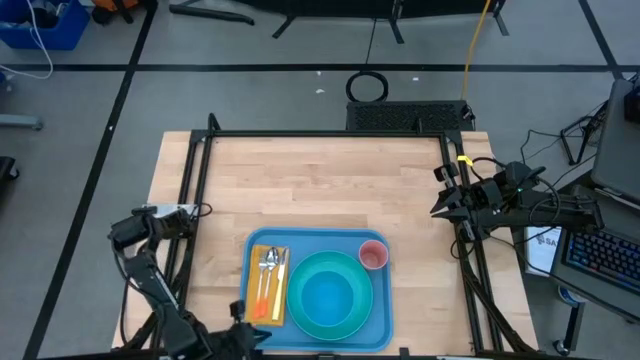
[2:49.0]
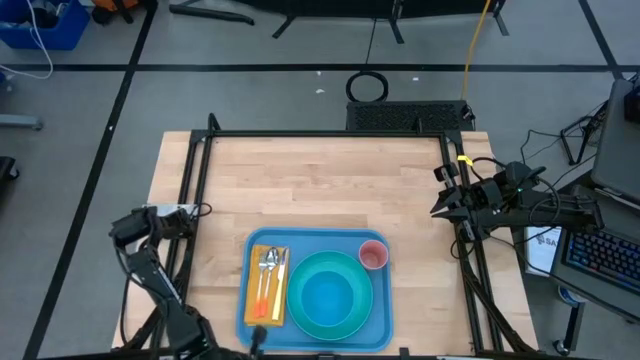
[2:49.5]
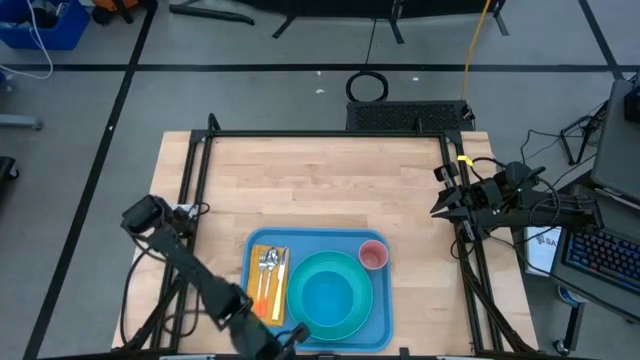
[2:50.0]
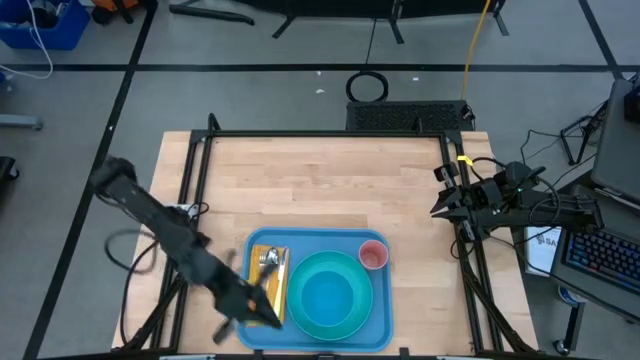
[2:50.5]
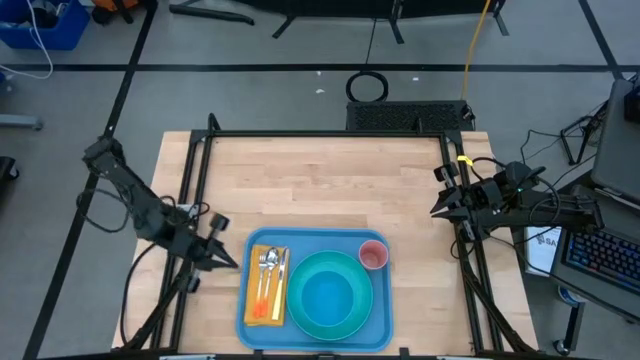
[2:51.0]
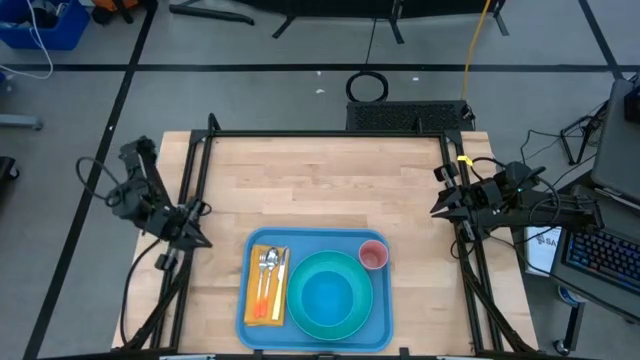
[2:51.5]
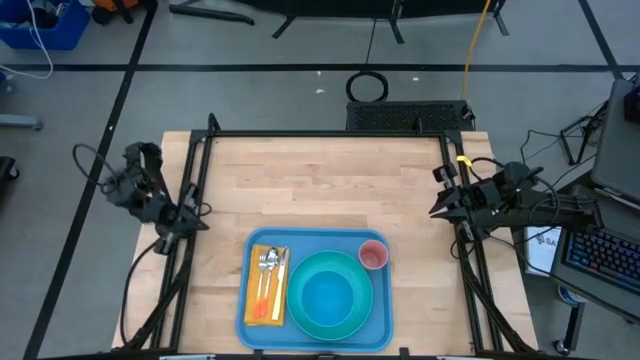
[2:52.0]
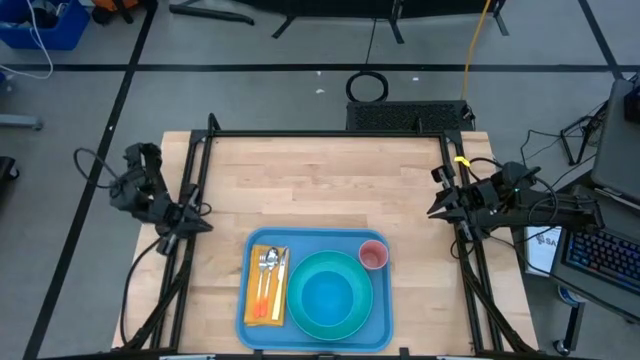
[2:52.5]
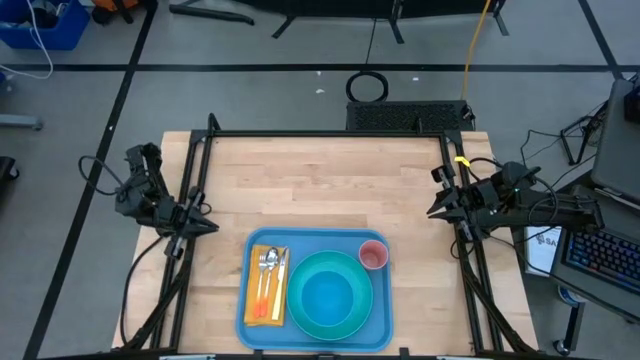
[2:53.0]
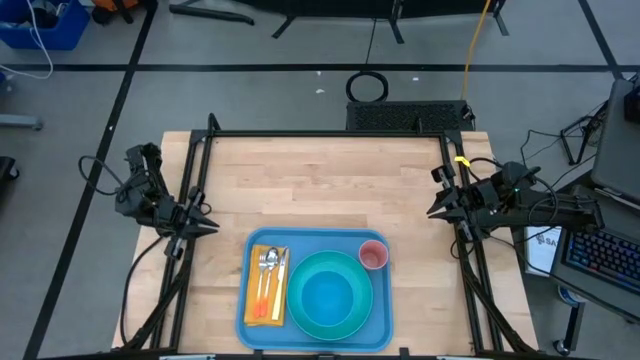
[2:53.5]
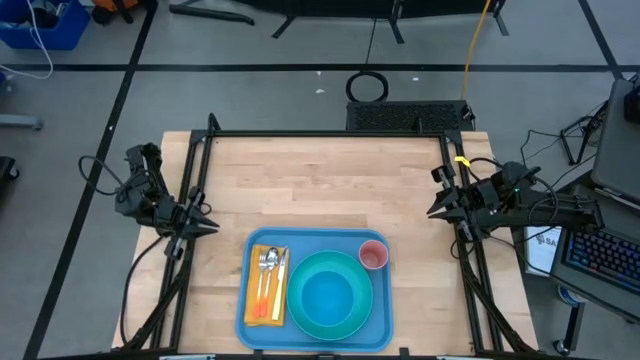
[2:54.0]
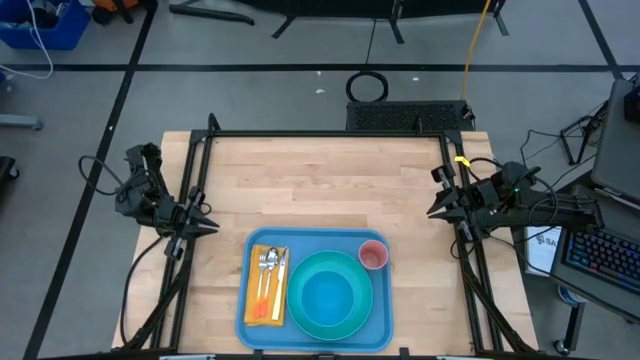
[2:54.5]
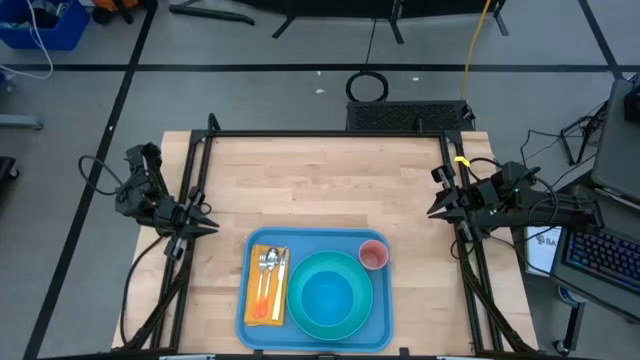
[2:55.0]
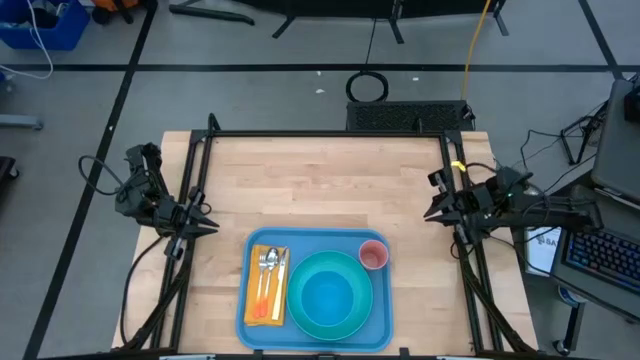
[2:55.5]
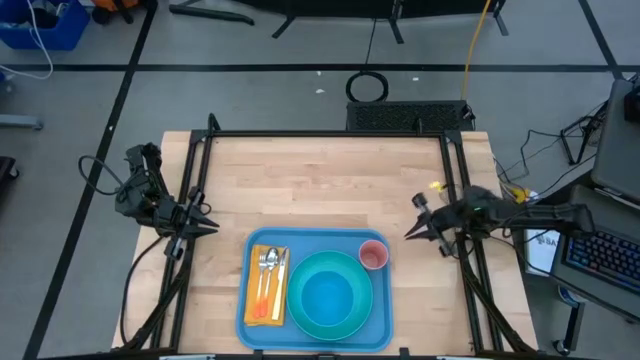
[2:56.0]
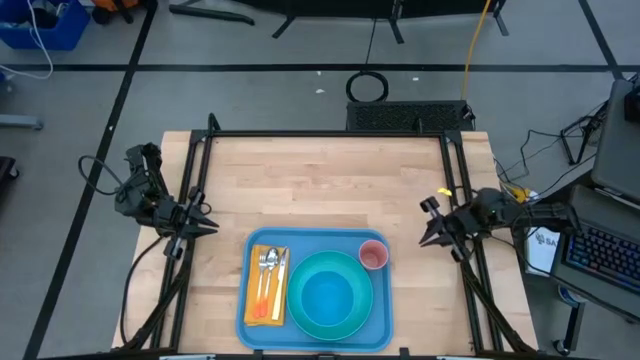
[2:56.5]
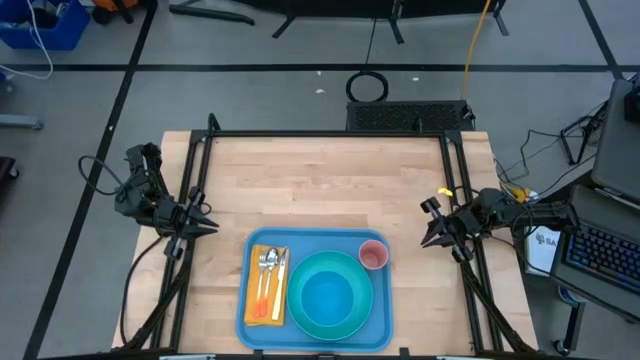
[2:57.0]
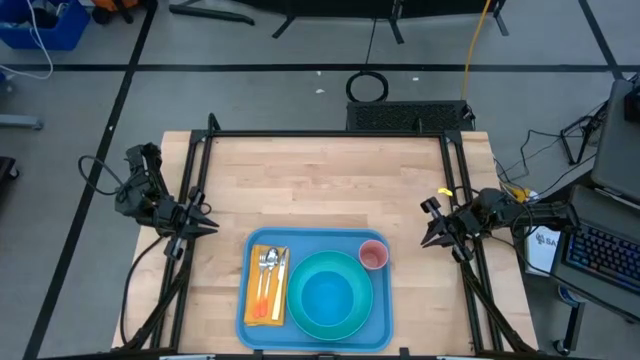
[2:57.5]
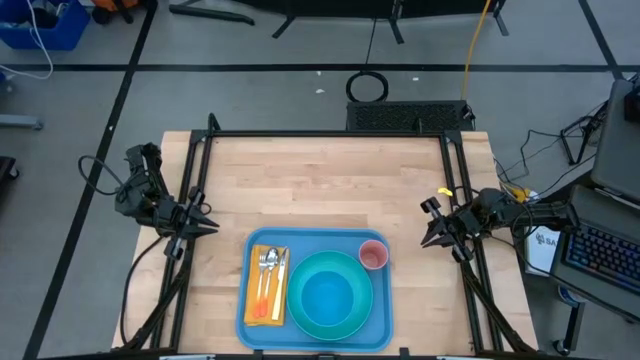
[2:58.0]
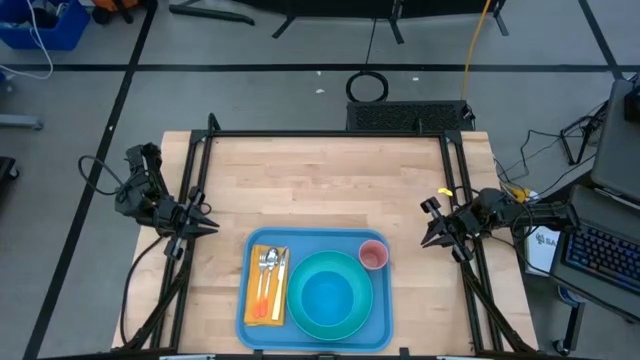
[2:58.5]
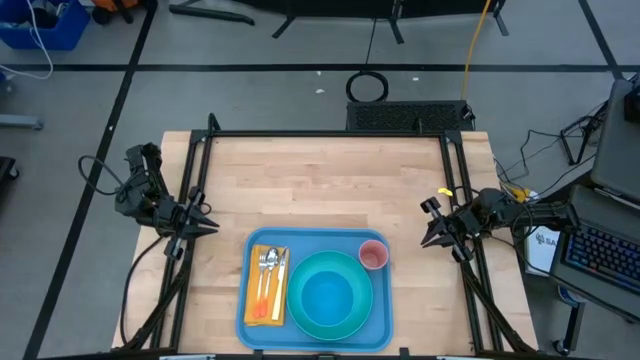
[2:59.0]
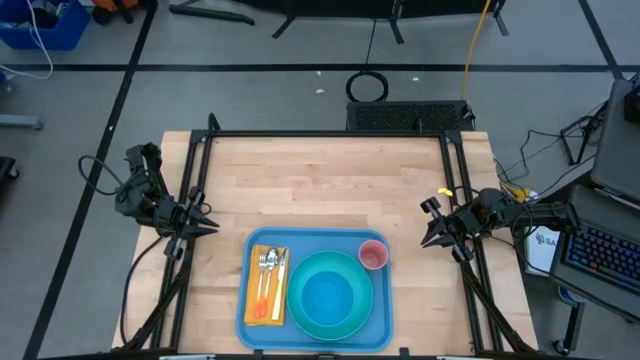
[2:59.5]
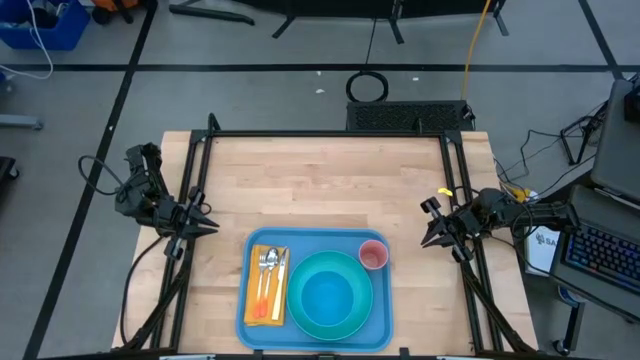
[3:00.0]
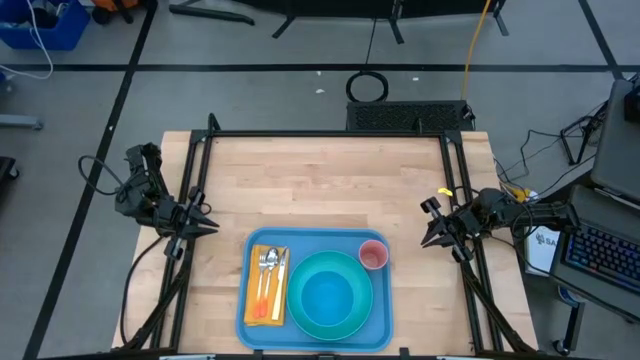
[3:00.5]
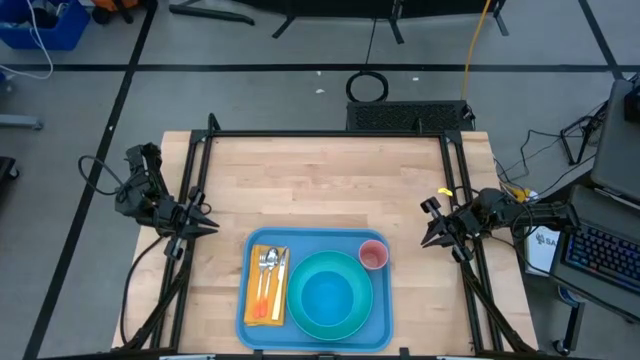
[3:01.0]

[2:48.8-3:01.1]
Task: Set up tray
Return to Home Position

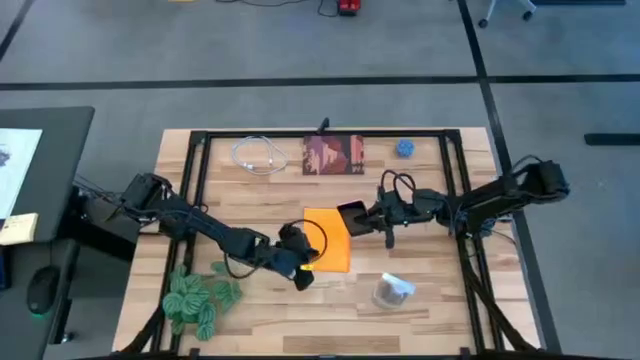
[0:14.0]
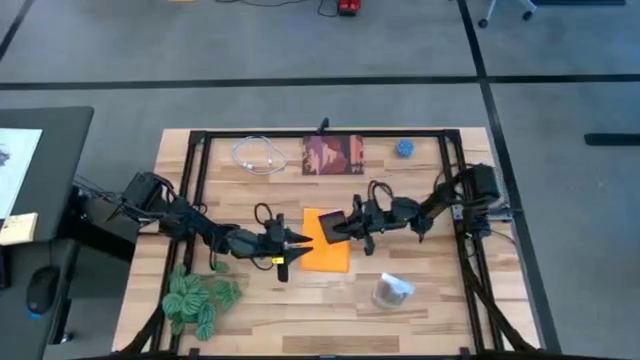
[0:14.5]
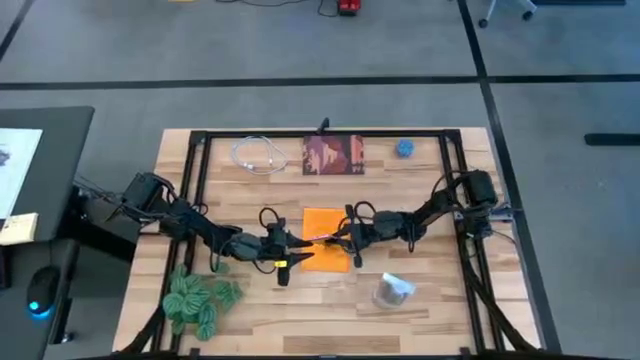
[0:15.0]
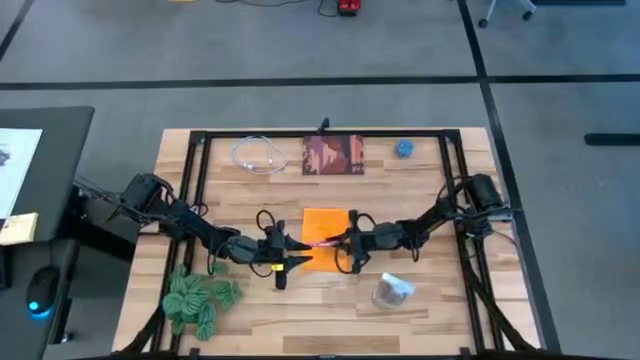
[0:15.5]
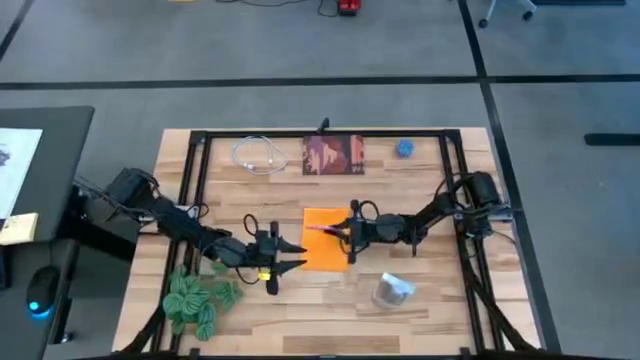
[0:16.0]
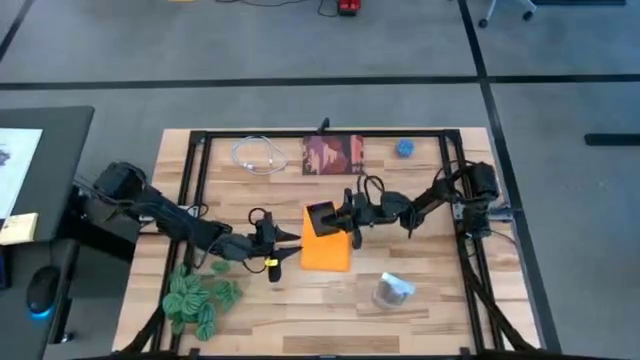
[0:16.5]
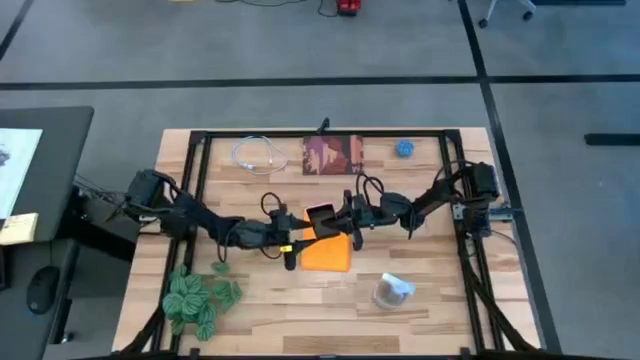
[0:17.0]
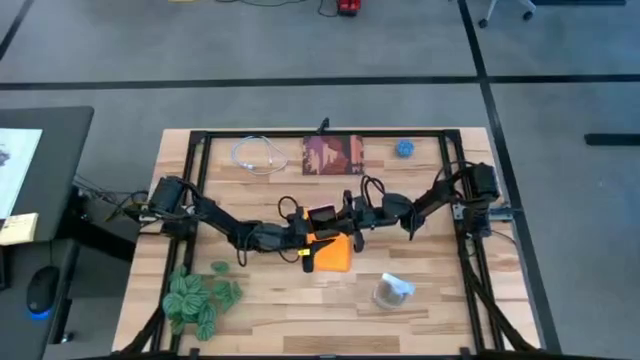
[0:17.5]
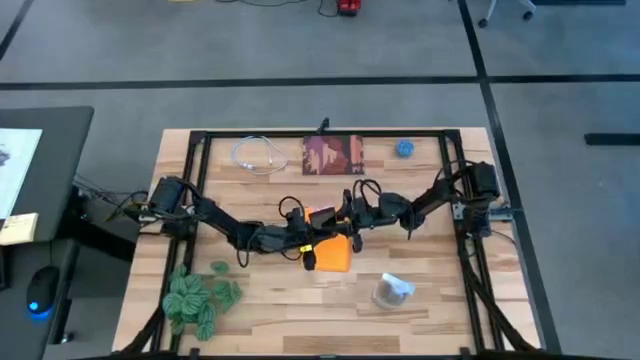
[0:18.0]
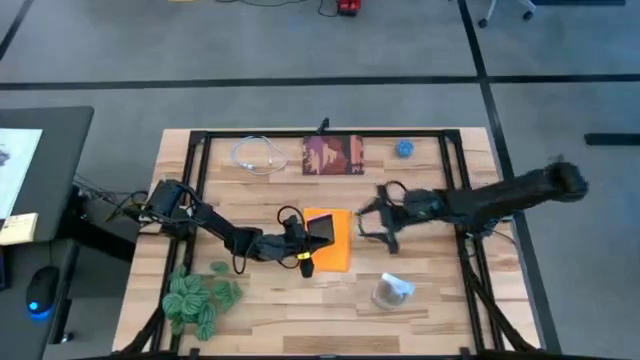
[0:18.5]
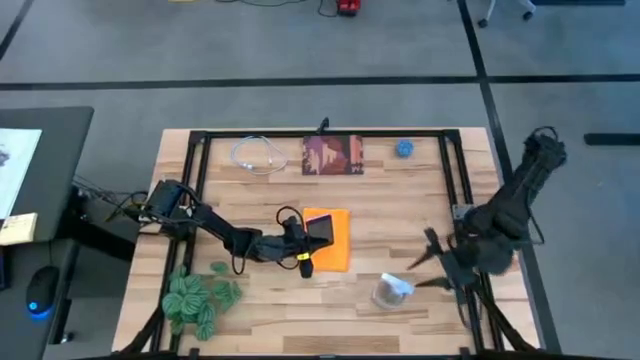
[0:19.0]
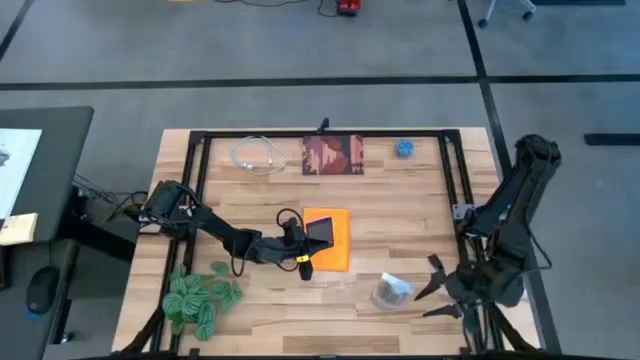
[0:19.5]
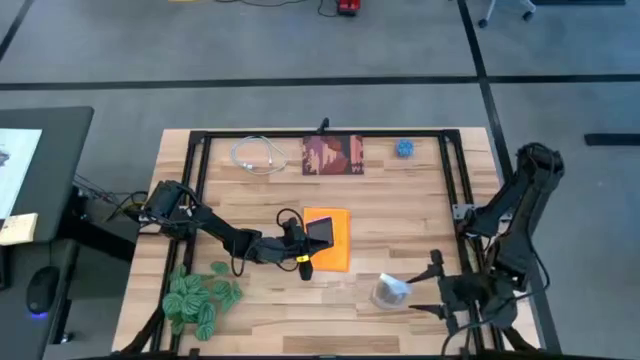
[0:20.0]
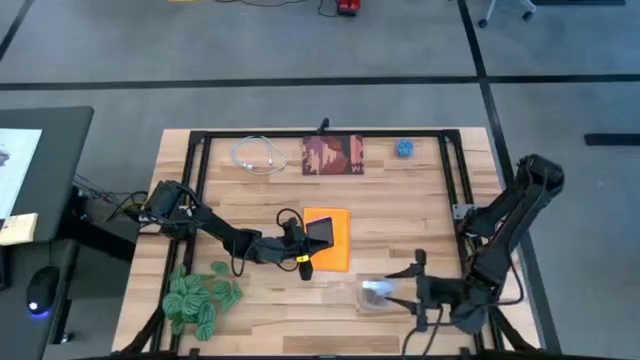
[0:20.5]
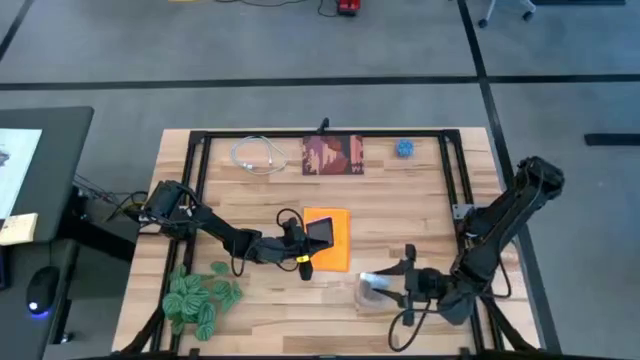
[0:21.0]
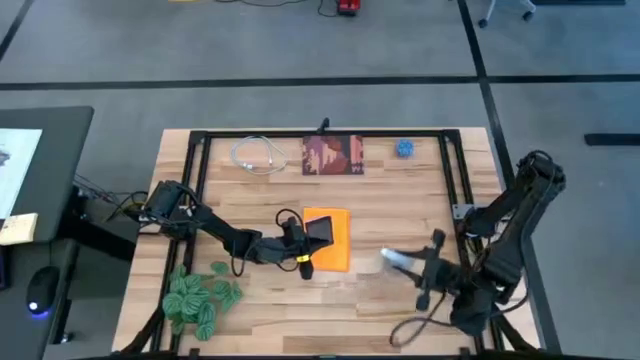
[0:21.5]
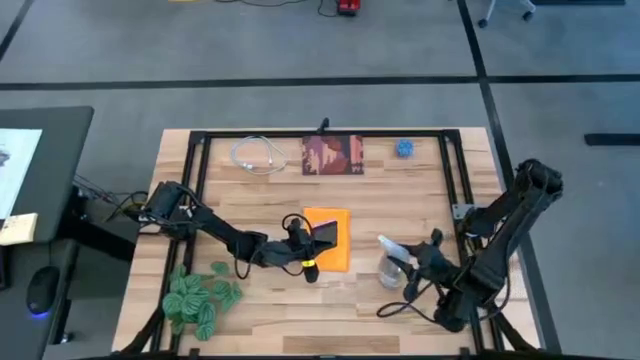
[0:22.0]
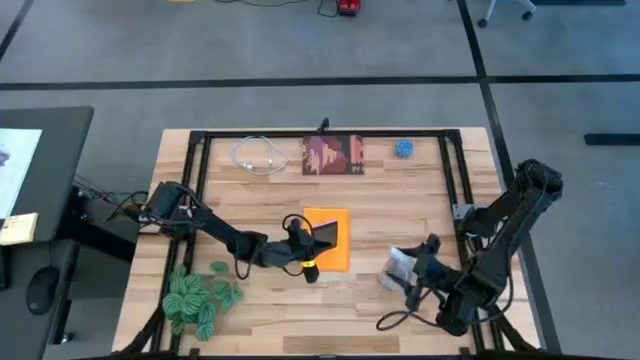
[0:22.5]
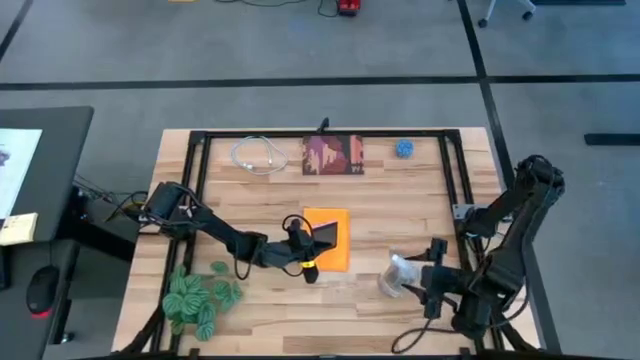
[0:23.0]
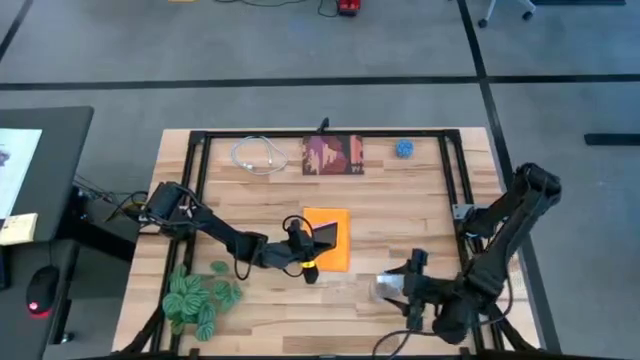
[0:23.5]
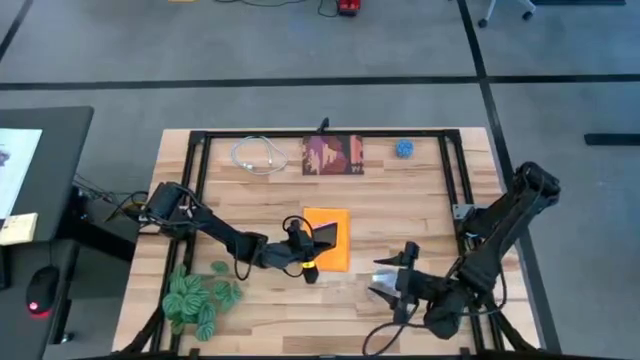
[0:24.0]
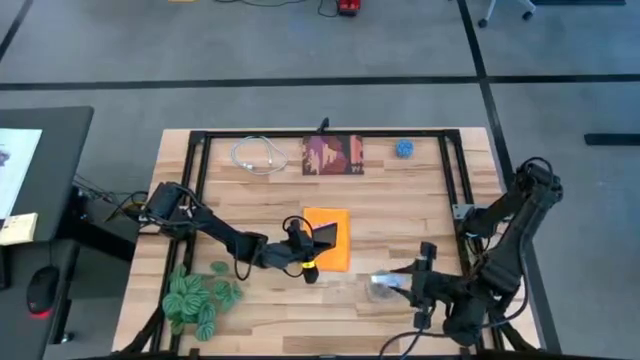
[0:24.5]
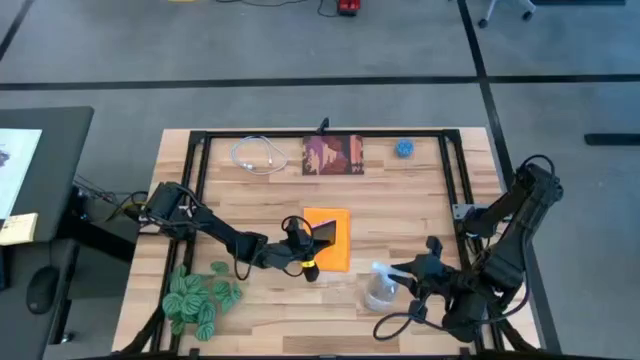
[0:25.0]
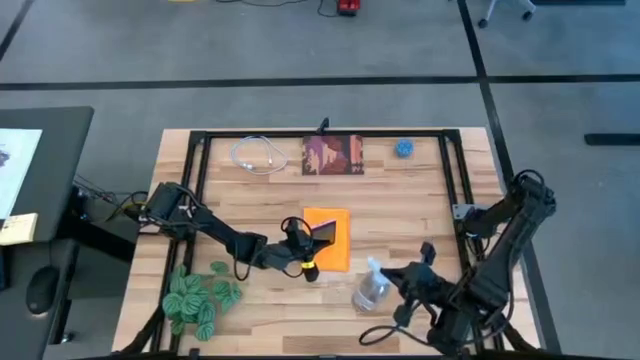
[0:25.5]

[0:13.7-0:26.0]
Task: Apply microfiber cloth
Spray the front of the pink cellphone with the spray bottle
